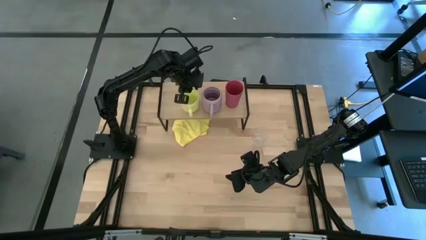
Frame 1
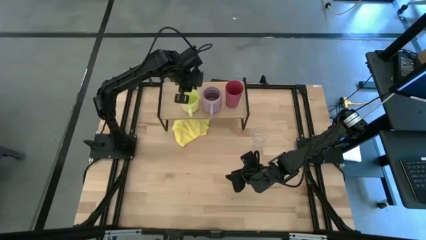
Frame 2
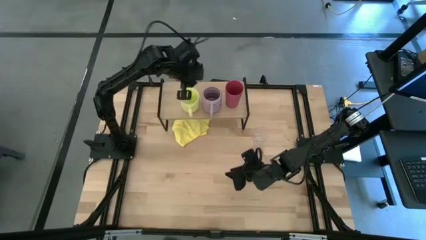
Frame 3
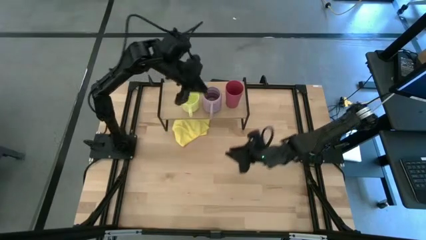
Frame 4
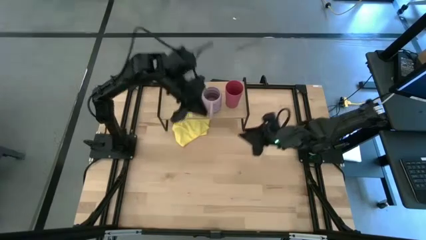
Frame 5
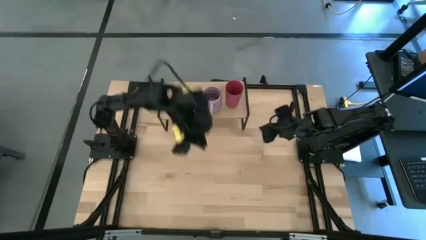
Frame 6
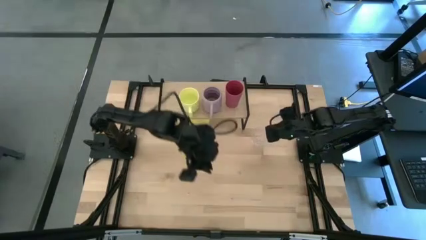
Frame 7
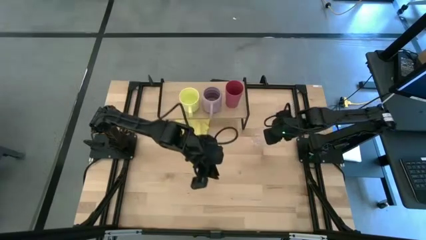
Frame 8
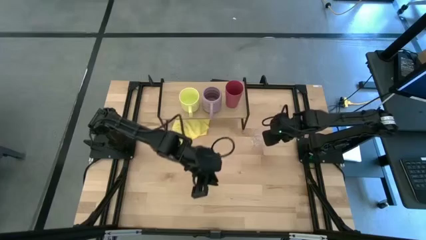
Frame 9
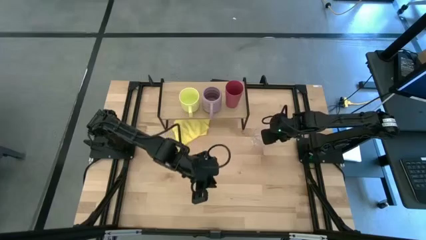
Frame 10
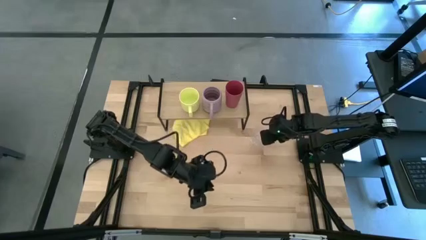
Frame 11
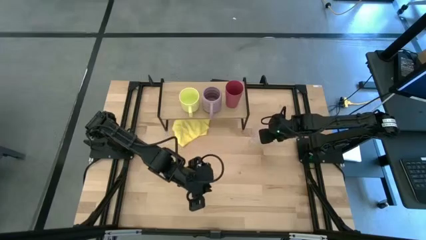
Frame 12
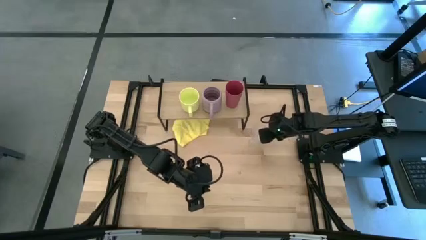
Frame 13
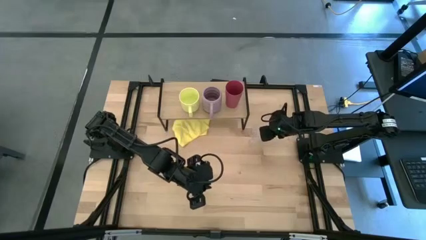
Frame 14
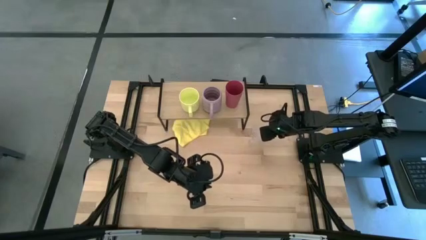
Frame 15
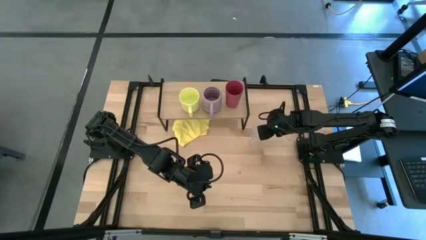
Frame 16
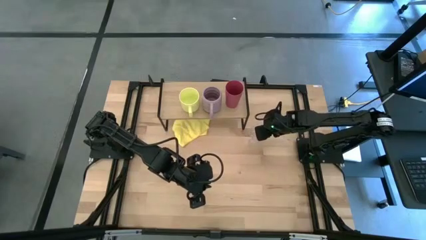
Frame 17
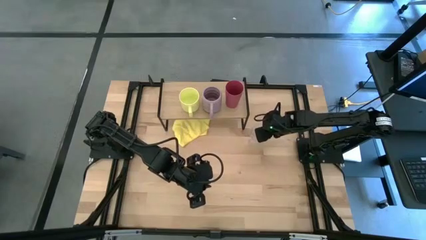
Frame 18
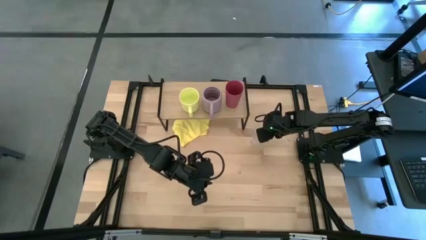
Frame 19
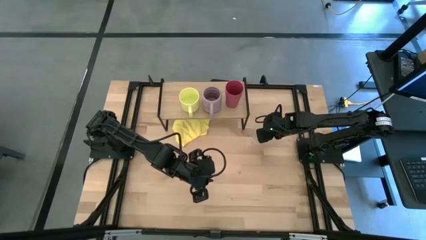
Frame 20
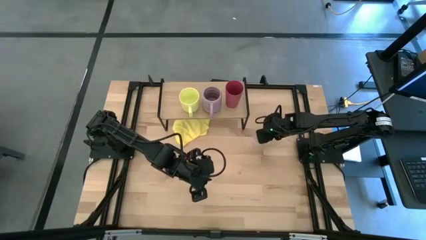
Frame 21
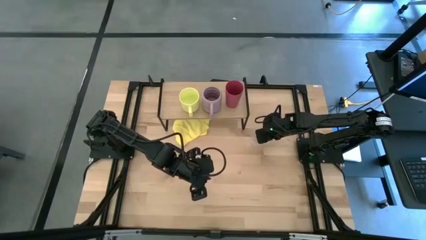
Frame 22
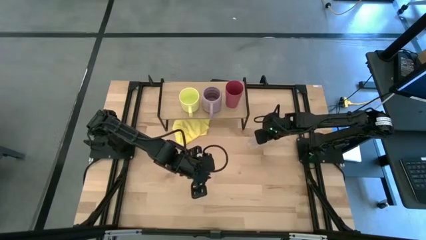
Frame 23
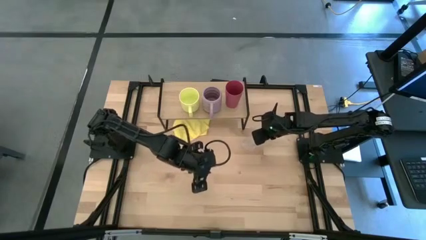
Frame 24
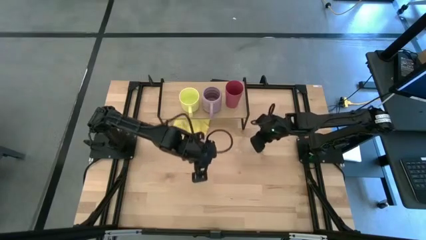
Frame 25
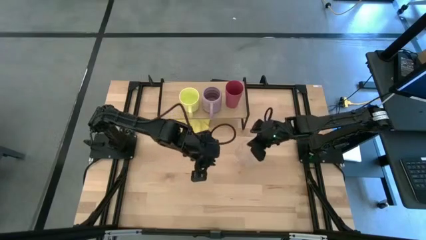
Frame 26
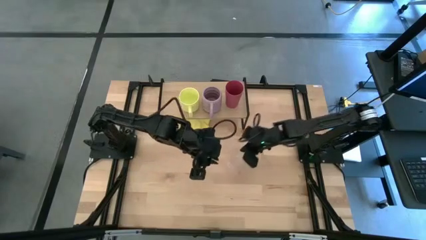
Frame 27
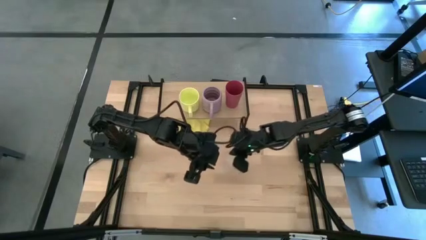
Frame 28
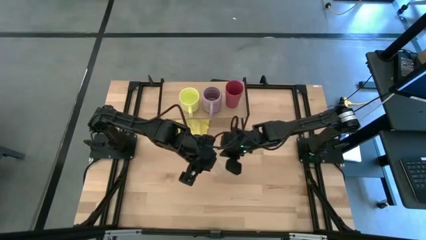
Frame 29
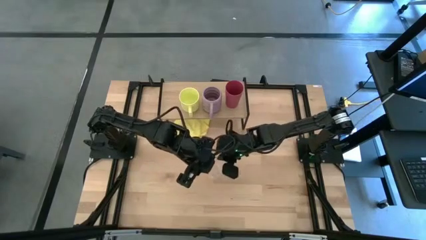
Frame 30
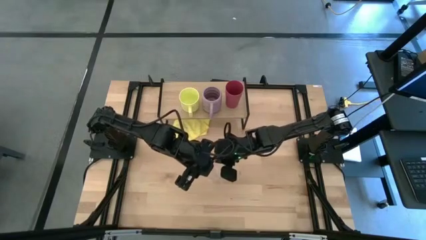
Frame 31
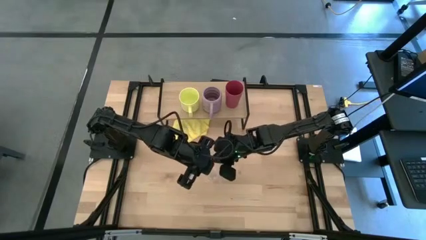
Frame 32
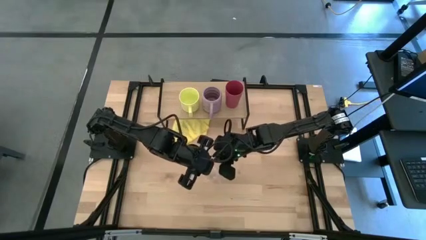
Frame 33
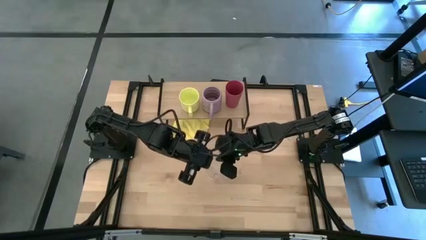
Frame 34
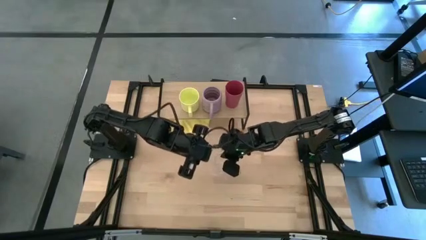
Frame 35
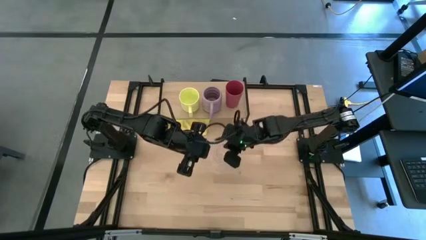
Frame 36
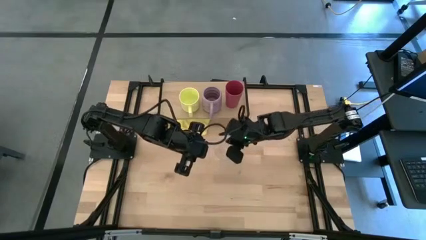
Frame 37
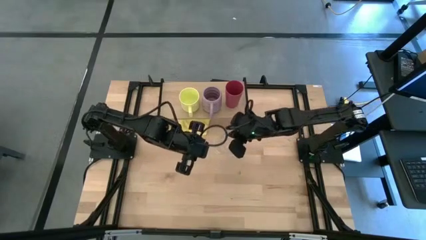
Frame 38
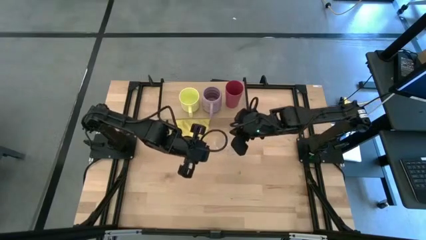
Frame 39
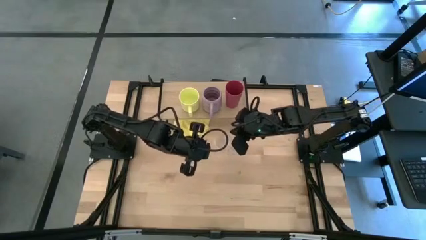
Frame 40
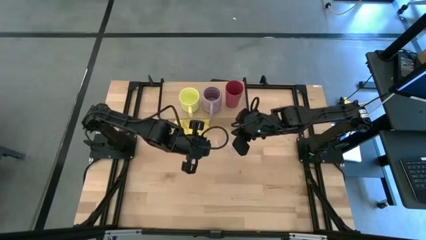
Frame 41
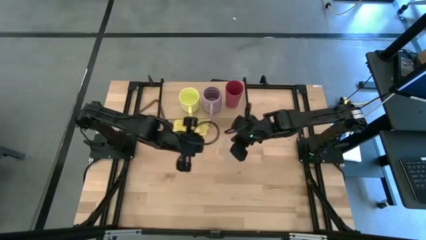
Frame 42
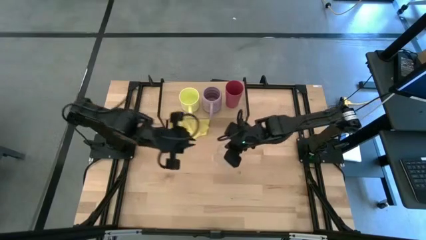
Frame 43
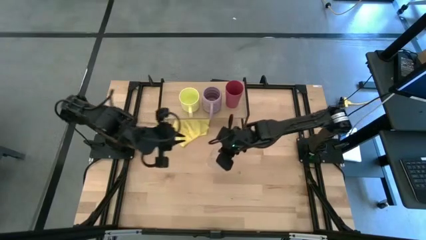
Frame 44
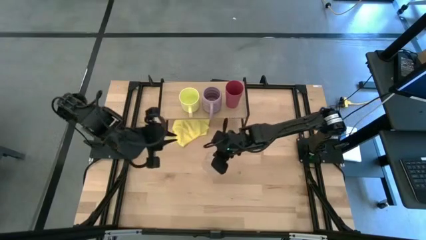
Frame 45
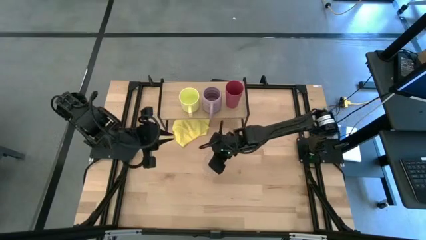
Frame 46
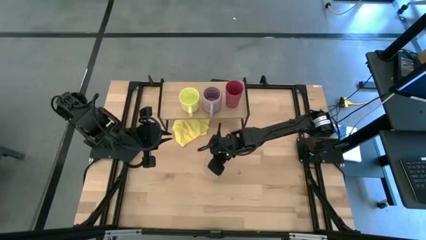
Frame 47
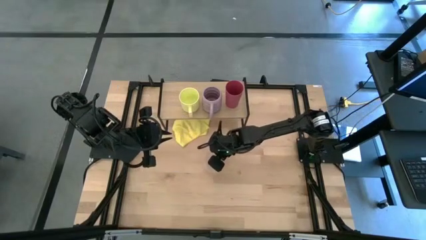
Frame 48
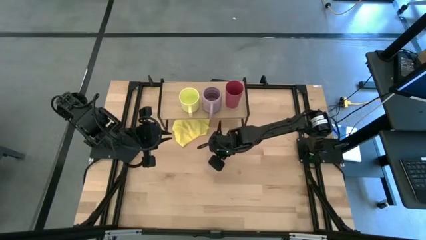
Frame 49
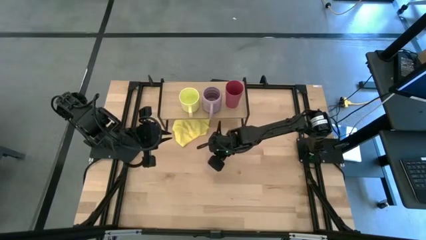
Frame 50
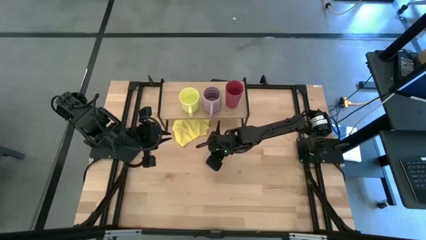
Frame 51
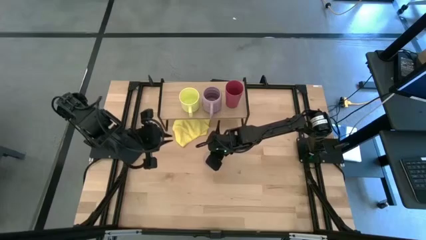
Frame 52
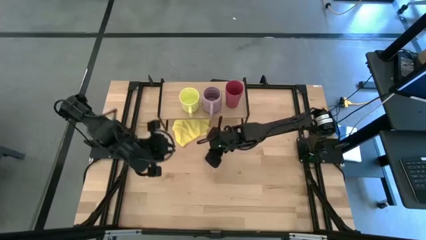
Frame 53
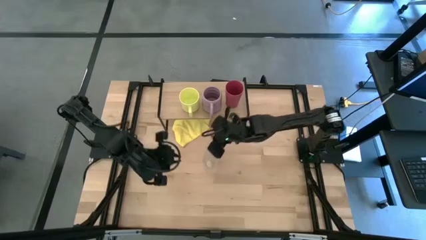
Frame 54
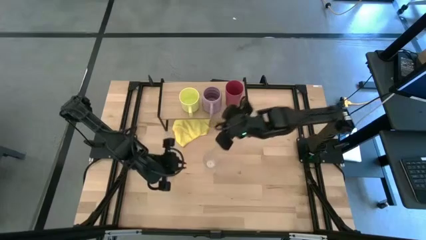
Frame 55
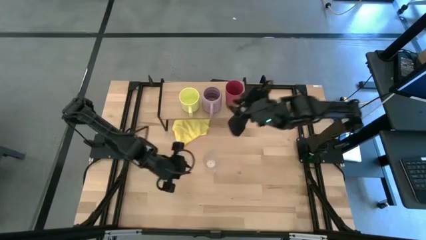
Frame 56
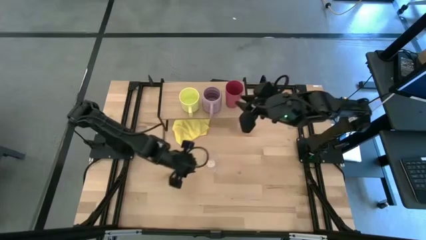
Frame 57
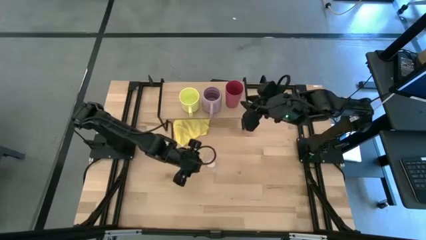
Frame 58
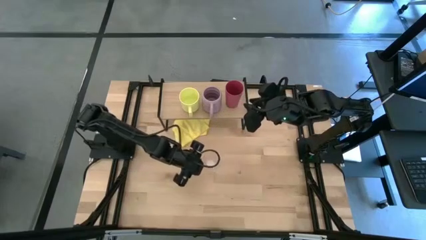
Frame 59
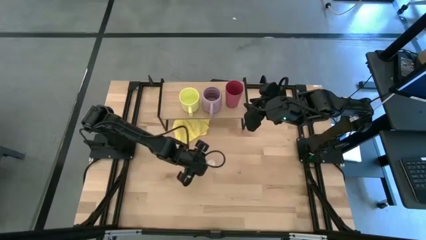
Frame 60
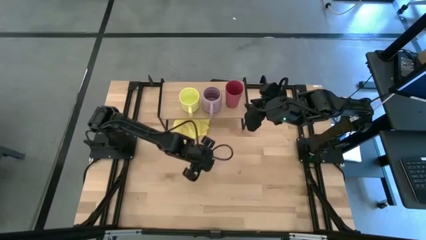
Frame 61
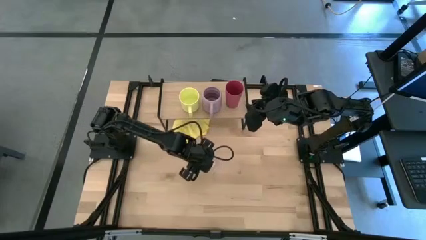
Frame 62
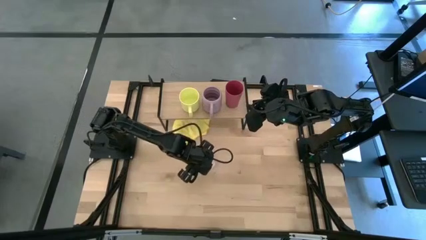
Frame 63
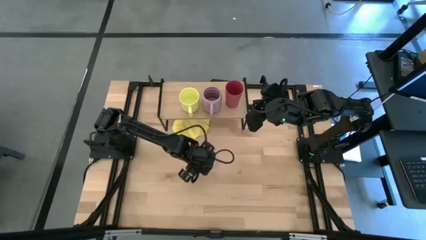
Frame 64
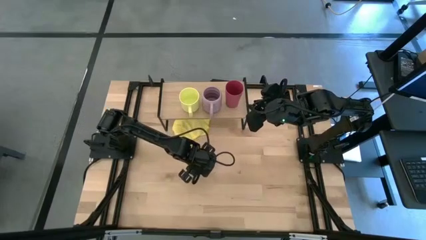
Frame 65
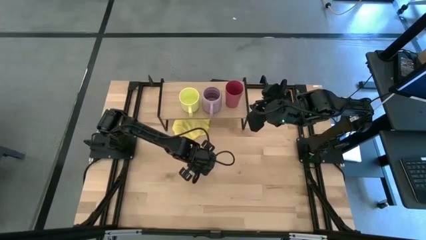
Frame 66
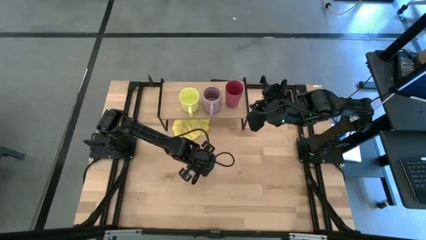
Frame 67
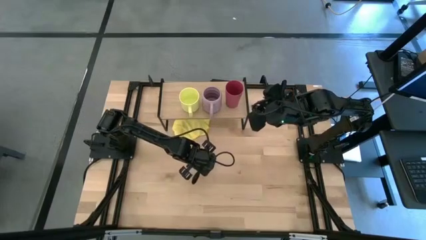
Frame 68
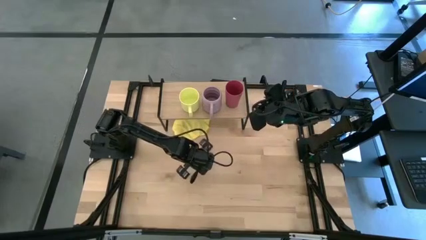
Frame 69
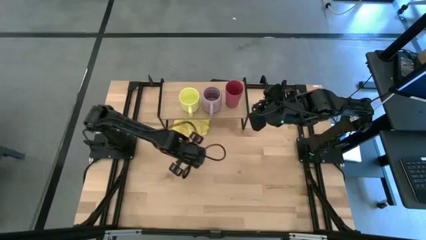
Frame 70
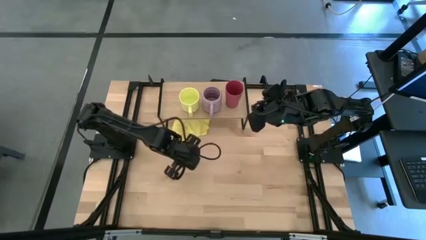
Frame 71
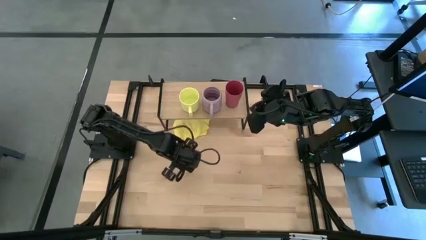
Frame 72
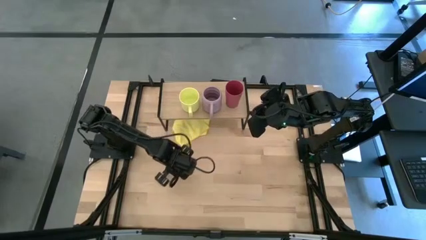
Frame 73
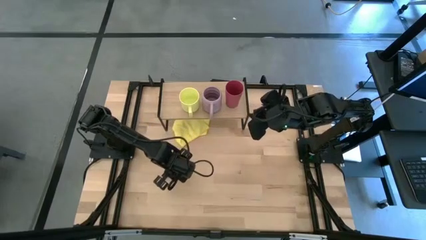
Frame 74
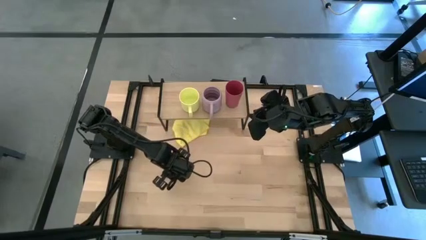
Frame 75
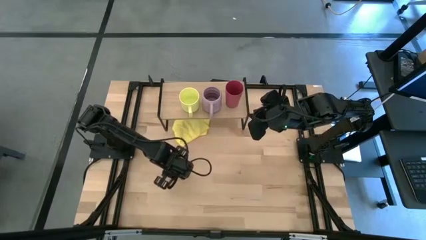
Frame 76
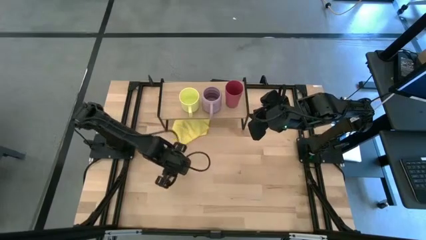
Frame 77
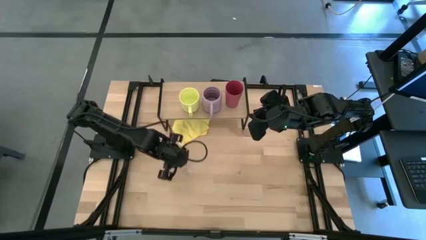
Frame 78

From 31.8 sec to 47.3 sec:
Task: Stack small to large cups/mugs on shelf
Put the transparent mug on the shelf
